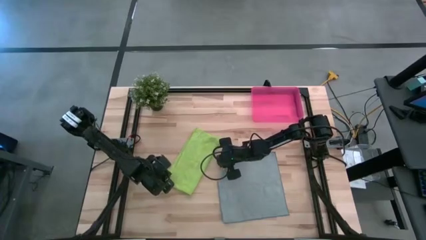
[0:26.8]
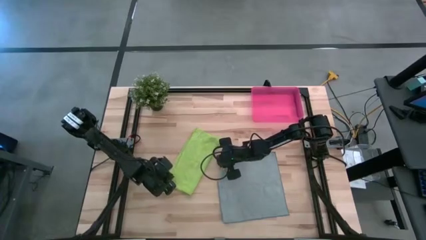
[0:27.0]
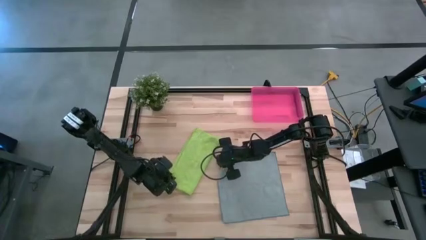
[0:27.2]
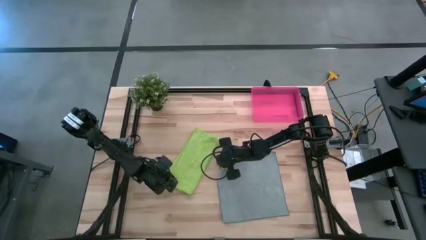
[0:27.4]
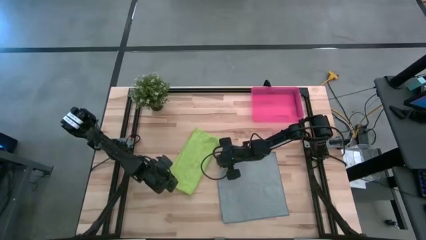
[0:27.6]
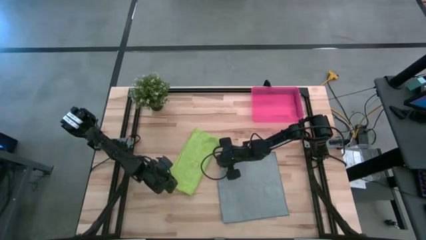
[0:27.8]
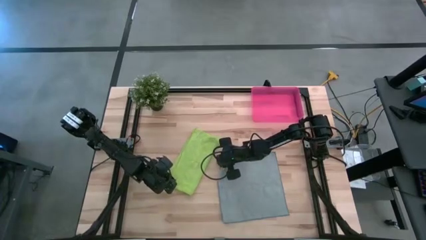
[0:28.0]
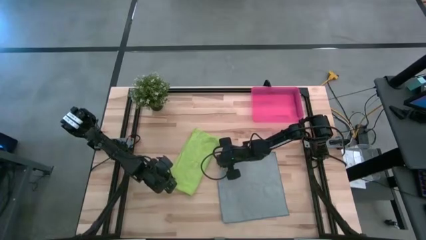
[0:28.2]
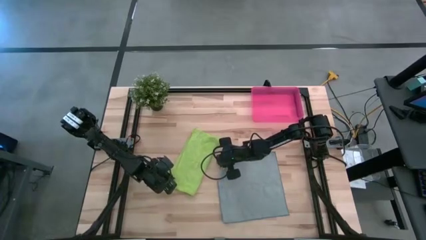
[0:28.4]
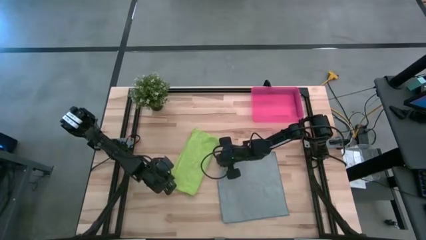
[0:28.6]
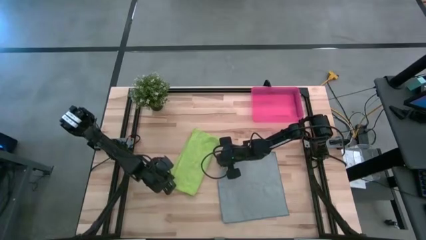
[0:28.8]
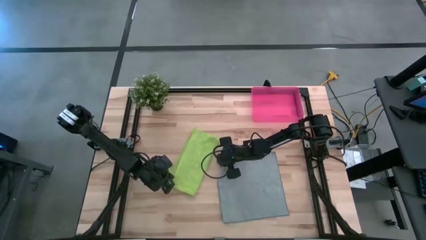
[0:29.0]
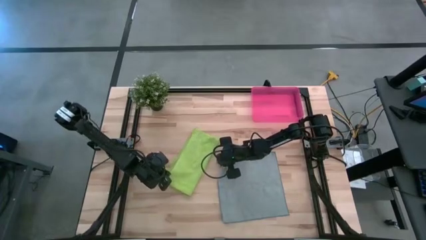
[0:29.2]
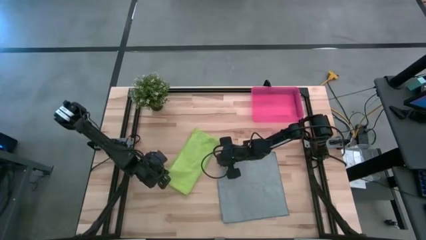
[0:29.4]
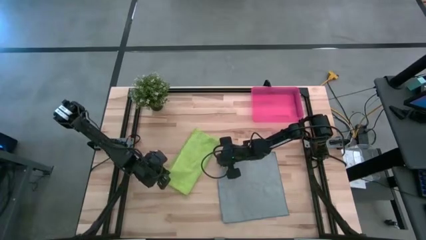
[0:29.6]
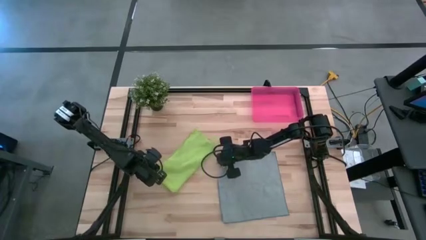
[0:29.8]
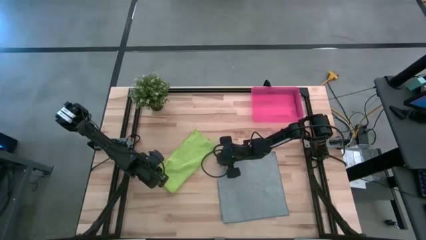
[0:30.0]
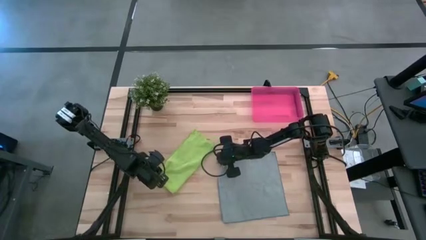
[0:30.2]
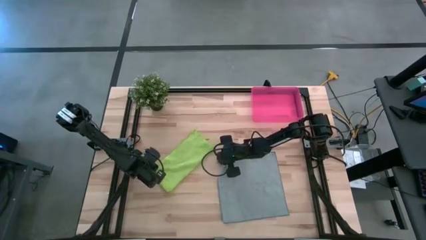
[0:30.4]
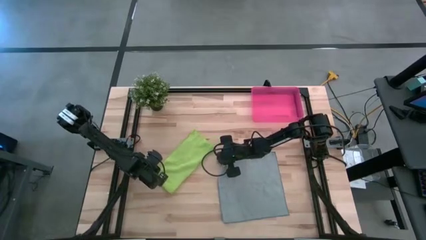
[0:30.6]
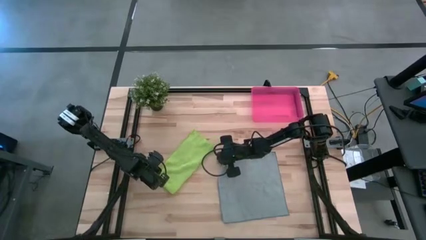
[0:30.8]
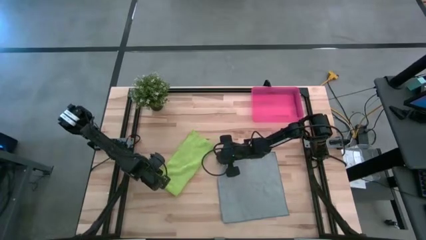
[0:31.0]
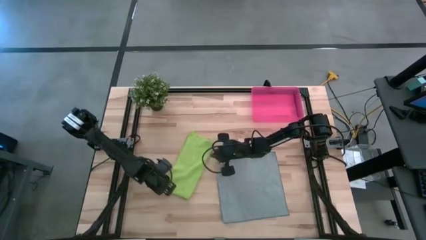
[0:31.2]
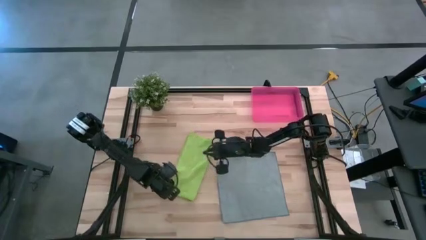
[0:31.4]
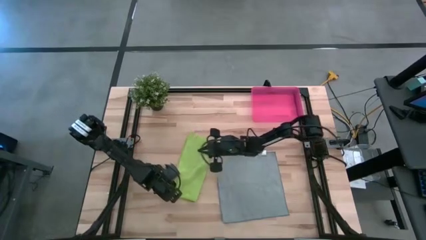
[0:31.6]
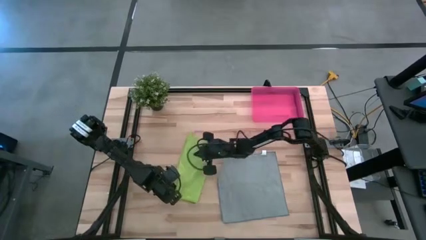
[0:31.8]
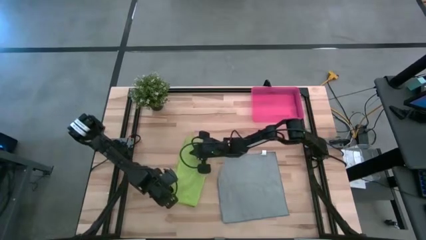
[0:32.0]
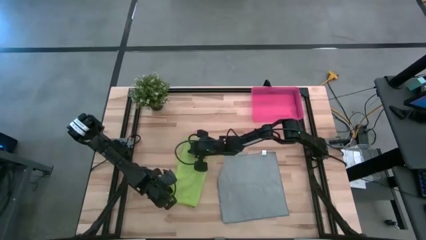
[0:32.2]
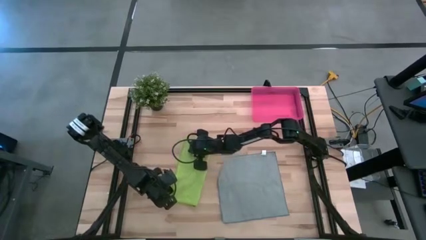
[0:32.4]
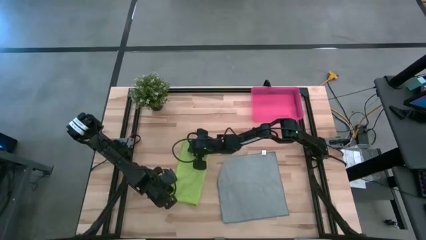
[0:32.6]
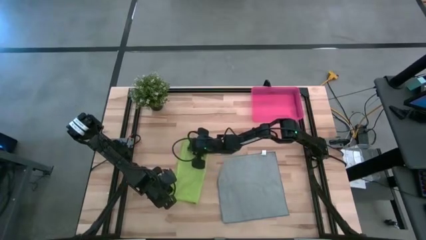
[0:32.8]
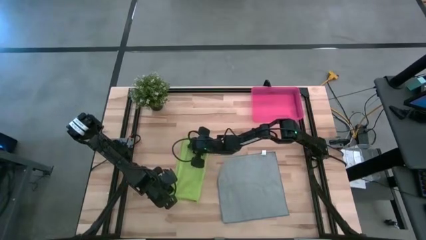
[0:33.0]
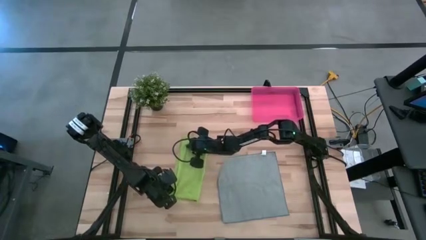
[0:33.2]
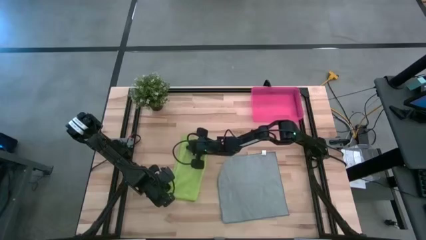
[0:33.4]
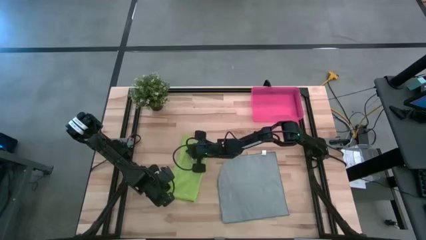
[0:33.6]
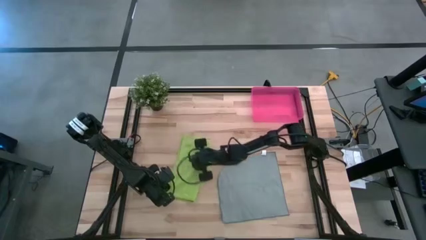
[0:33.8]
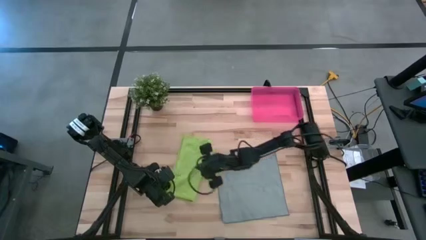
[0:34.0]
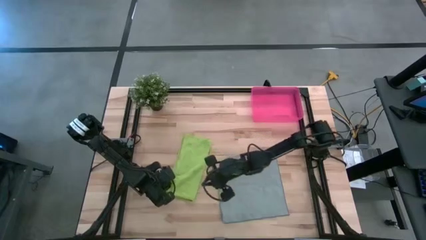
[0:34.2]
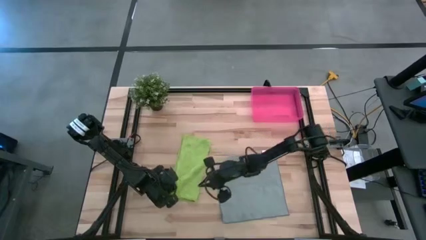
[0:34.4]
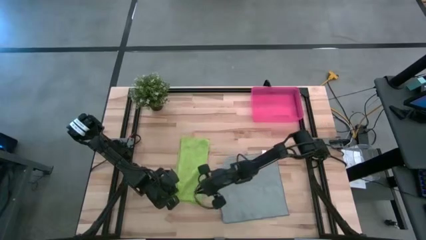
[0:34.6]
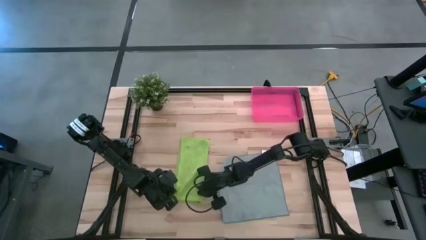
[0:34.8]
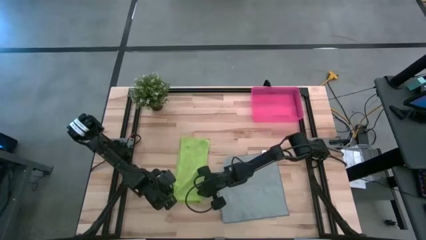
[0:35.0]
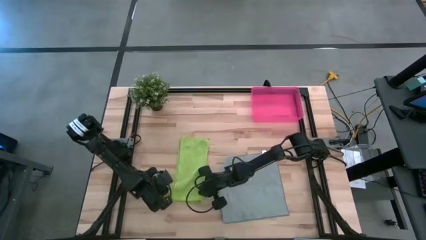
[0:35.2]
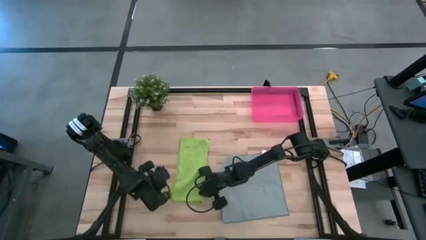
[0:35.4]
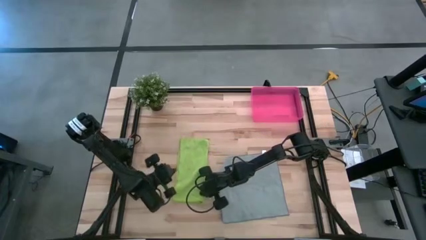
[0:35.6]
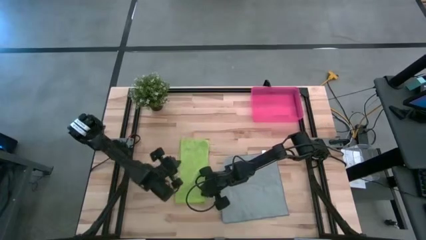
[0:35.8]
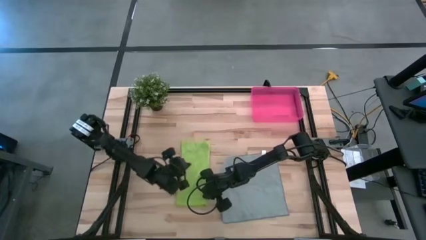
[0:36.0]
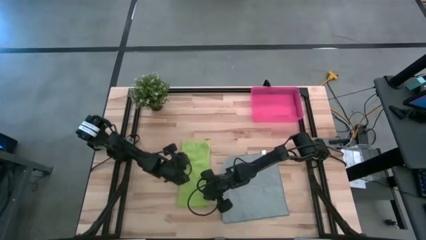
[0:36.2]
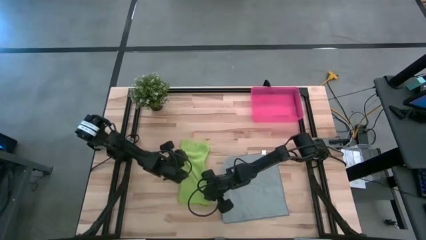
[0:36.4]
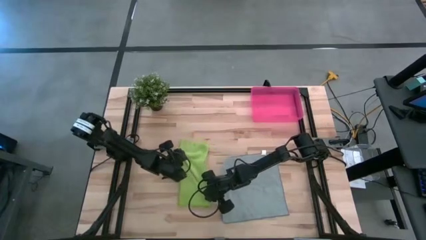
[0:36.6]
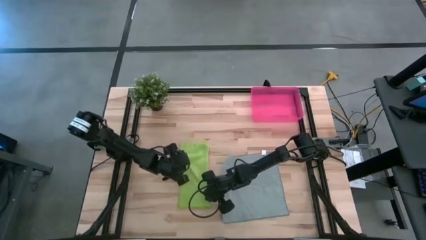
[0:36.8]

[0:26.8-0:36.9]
Task: Roll microfiber towels into tight, uniform cylinder then place into a basket
Fold the green microfiber cloth
